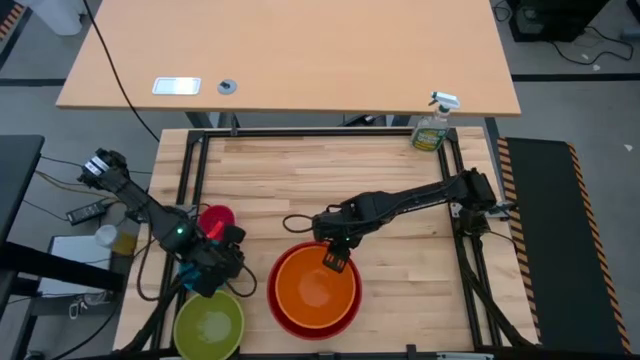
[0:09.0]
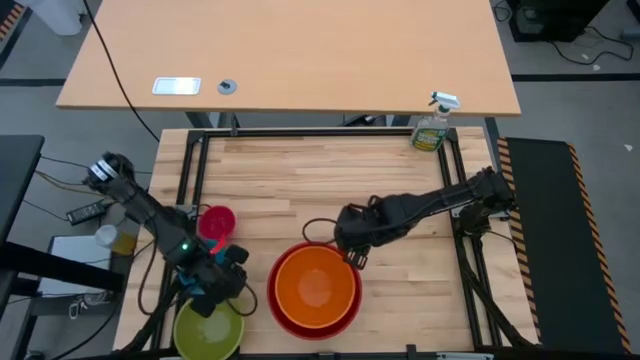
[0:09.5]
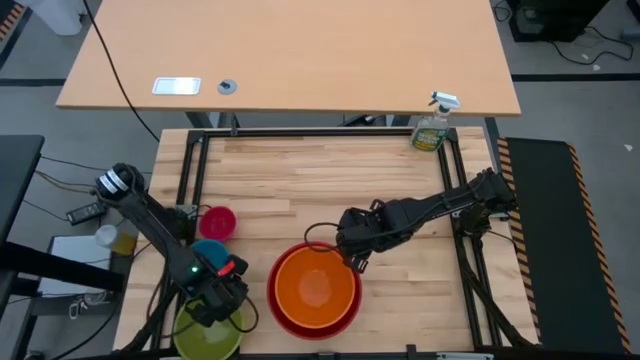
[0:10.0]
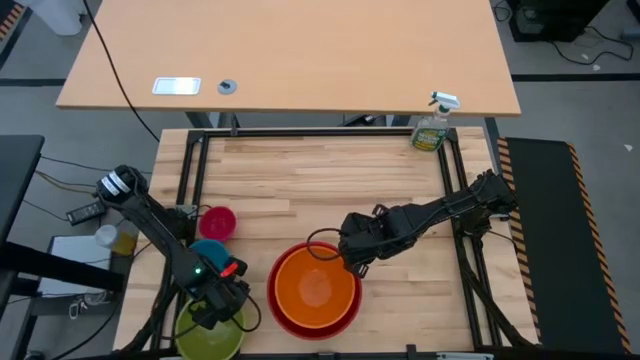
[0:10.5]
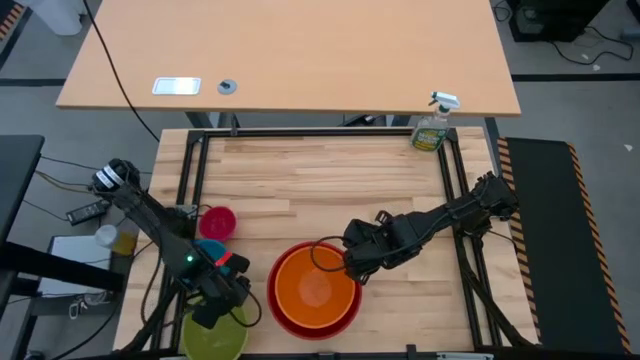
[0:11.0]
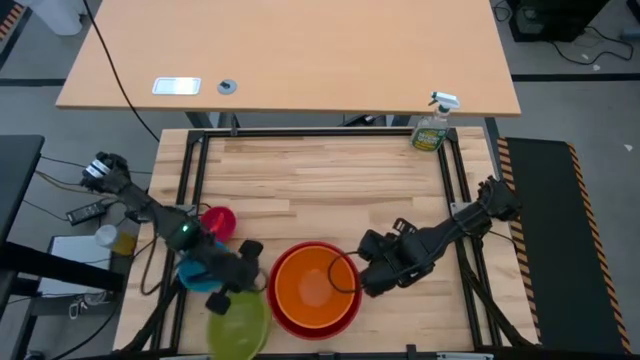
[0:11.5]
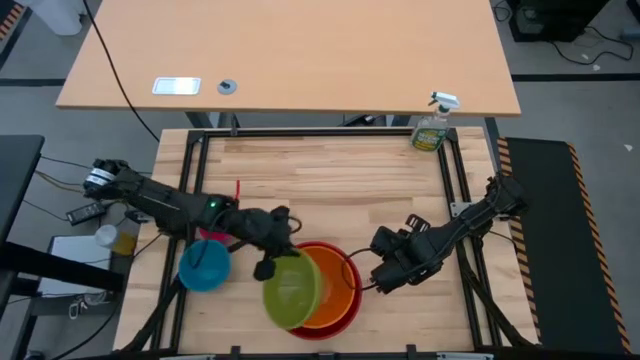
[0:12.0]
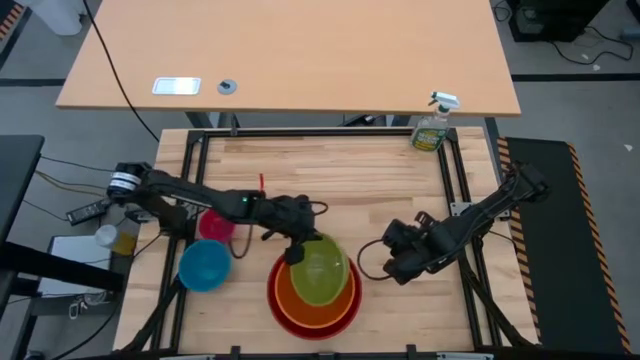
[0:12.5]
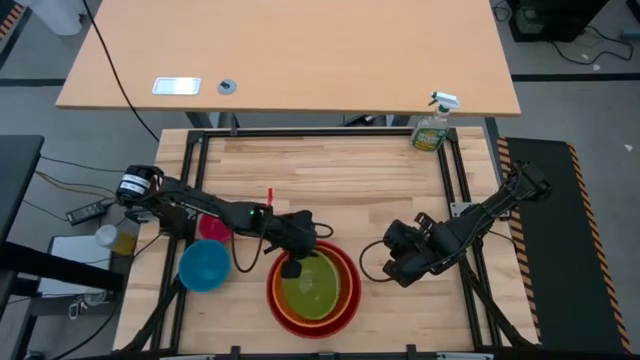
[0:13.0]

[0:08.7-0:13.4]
Stack the green bowl on top of the orange bowl

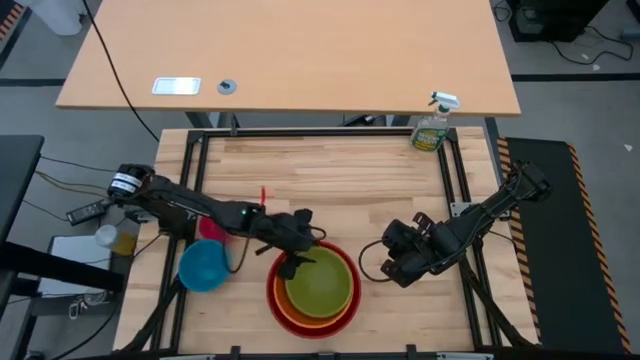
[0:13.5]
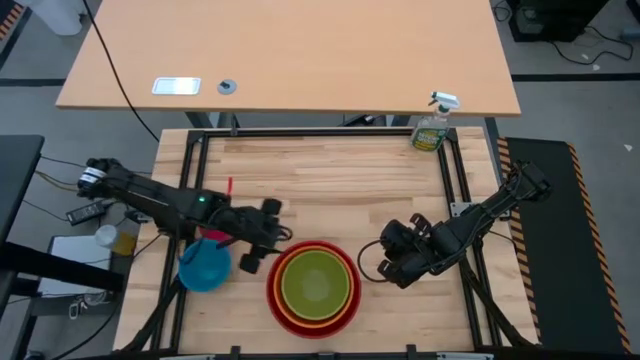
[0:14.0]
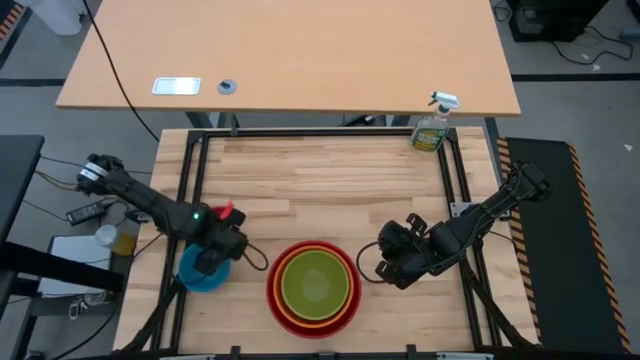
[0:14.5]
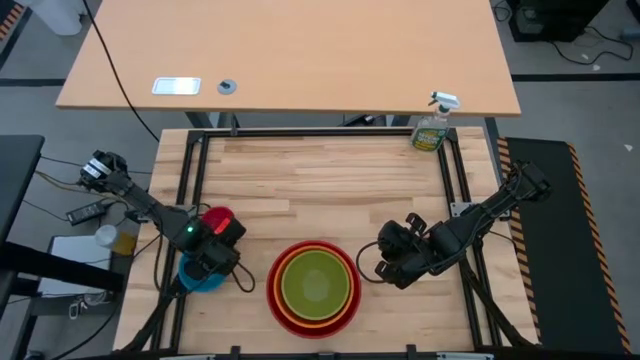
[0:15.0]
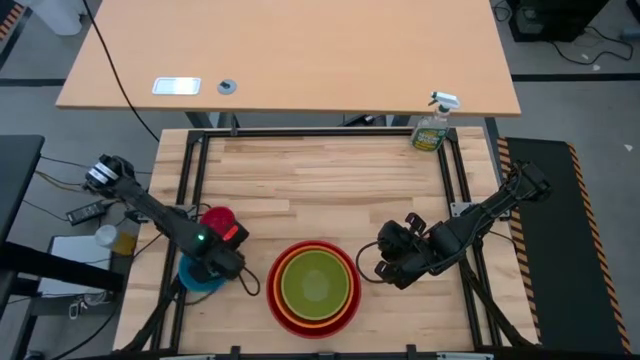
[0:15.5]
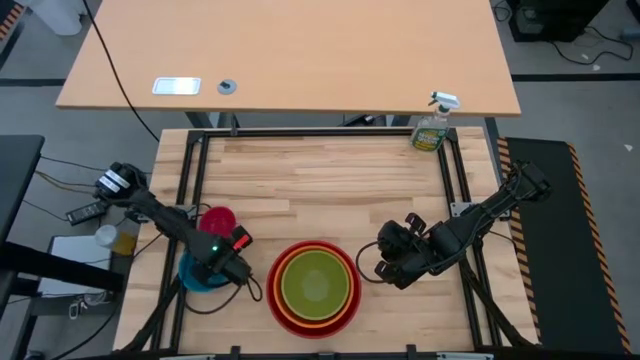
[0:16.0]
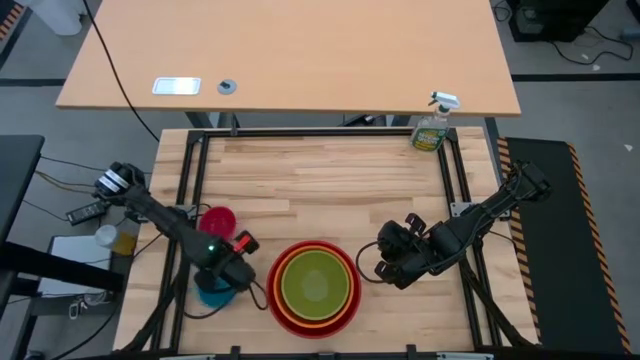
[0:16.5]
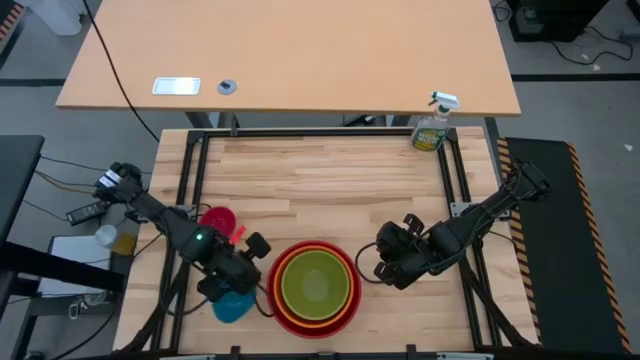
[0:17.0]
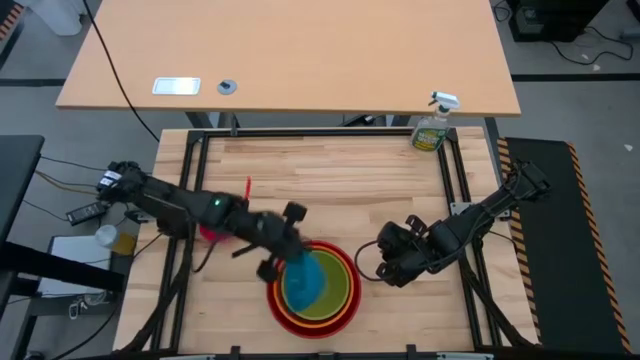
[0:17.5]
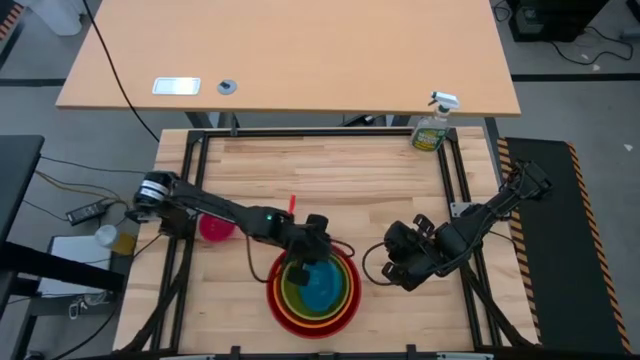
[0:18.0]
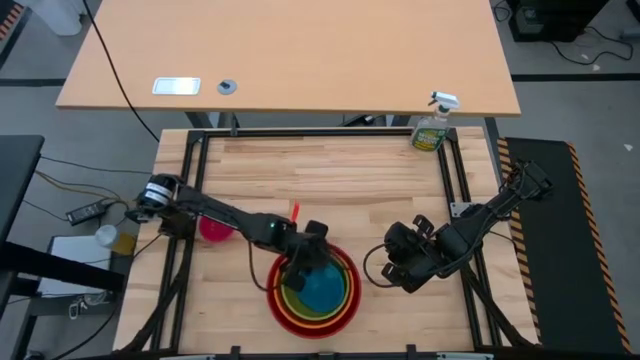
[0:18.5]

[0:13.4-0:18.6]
Stack the blue bowl on top the green bowl

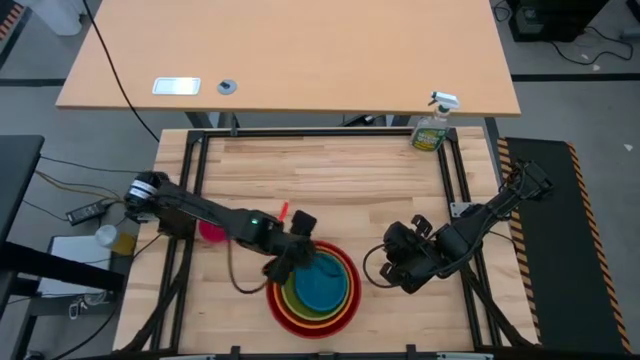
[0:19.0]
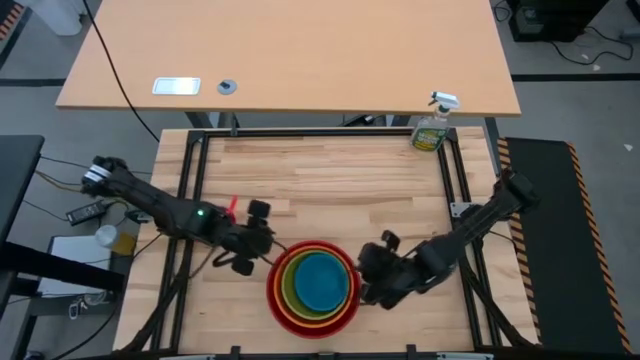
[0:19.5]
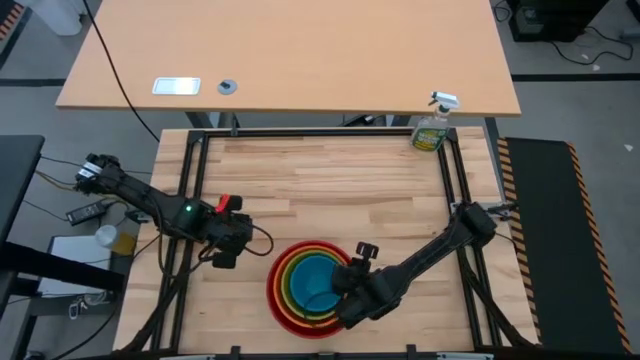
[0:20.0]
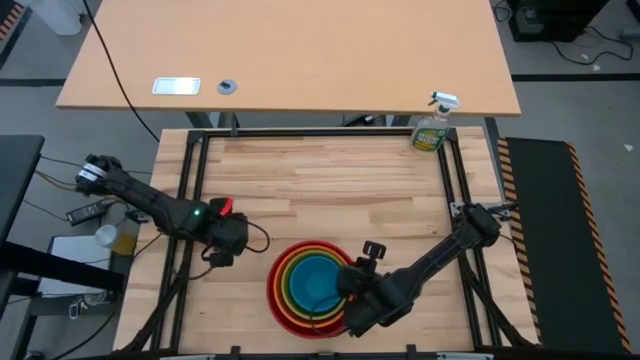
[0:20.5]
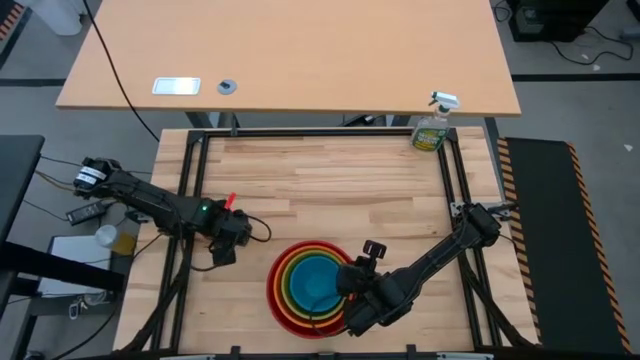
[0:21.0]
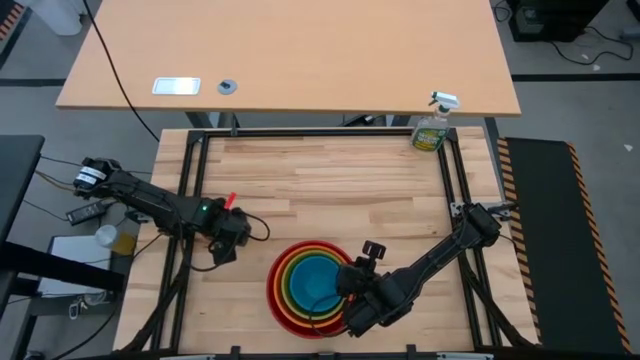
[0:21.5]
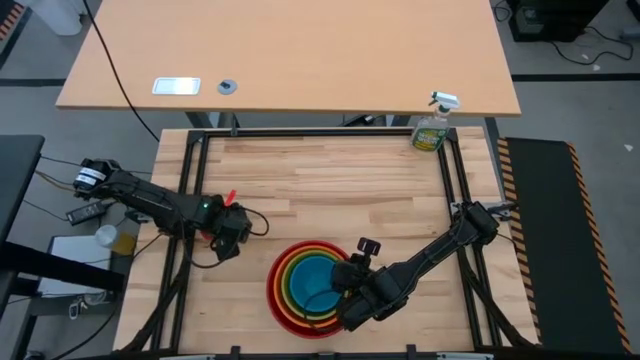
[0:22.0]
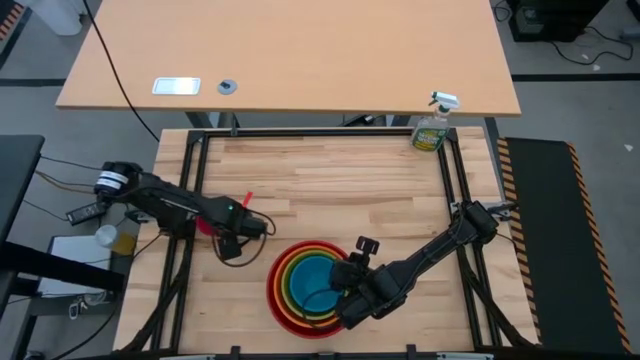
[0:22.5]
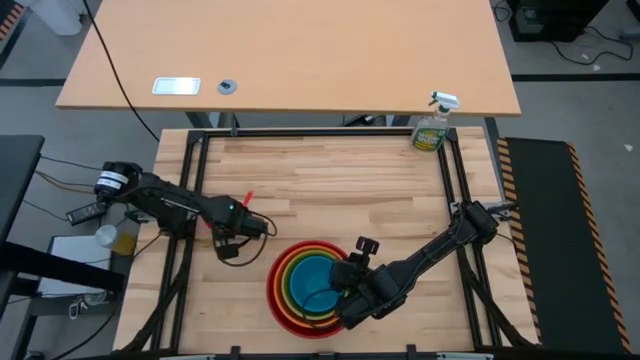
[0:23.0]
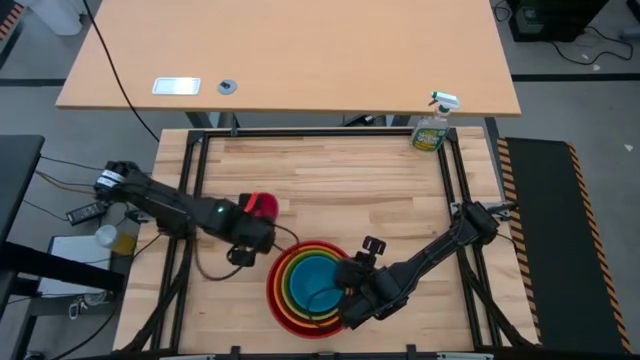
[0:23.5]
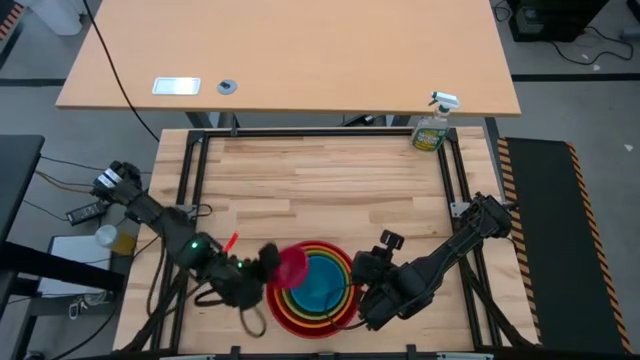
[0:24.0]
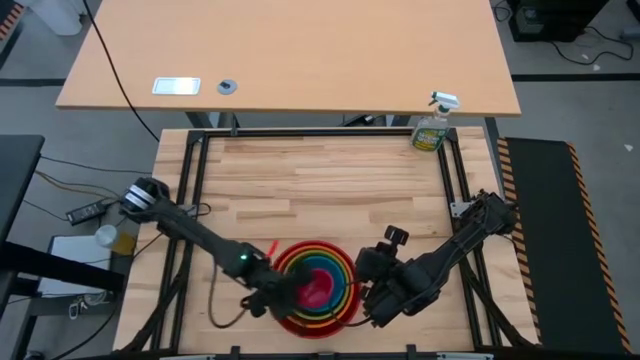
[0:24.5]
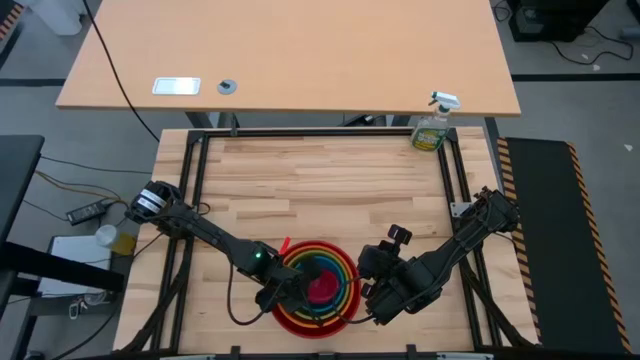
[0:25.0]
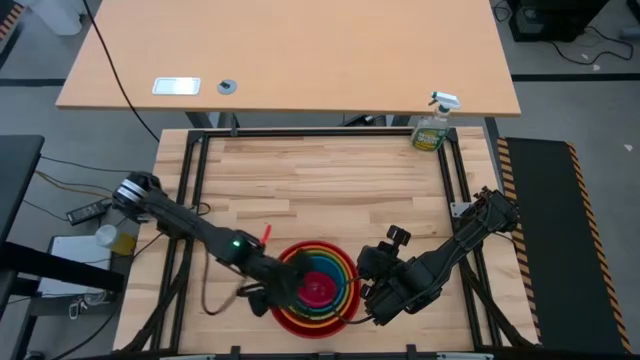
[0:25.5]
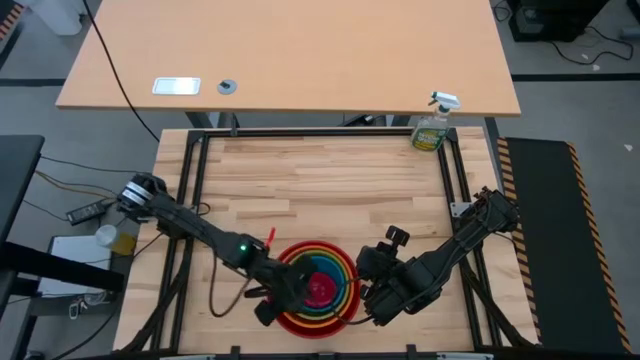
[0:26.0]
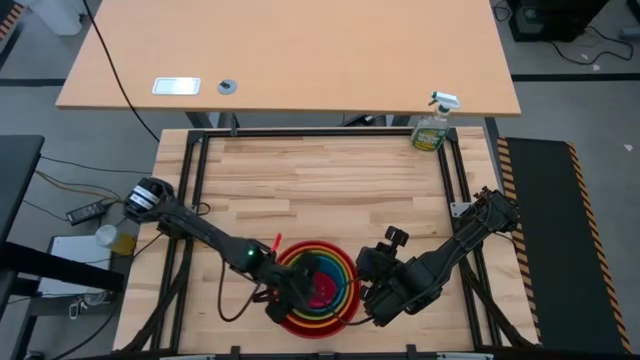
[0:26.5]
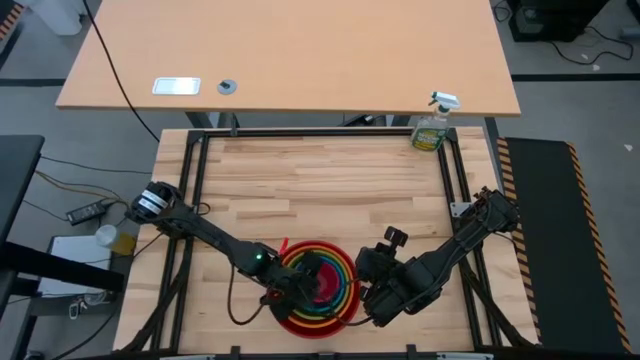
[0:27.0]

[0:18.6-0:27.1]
Stack the pink bowl on top of the blue bowl

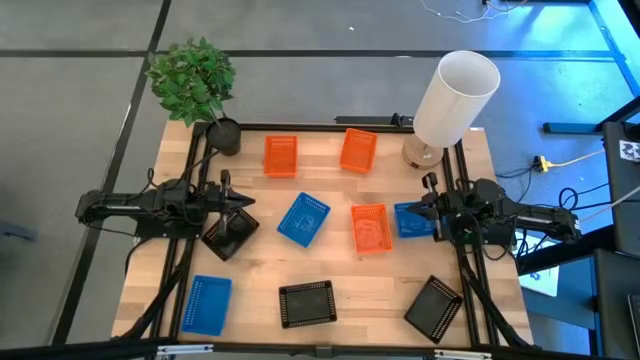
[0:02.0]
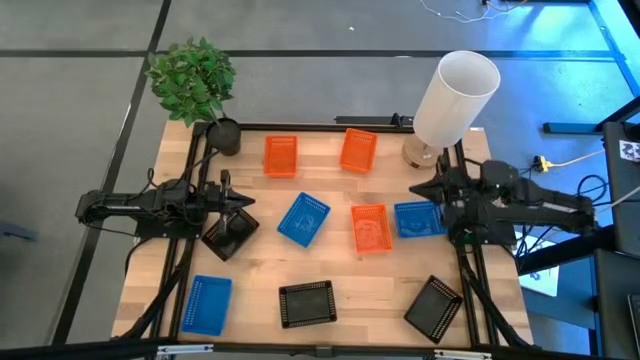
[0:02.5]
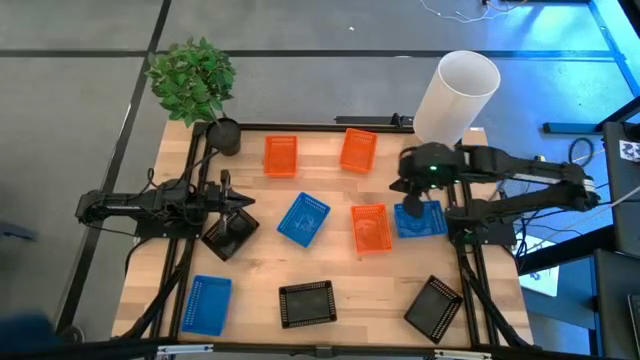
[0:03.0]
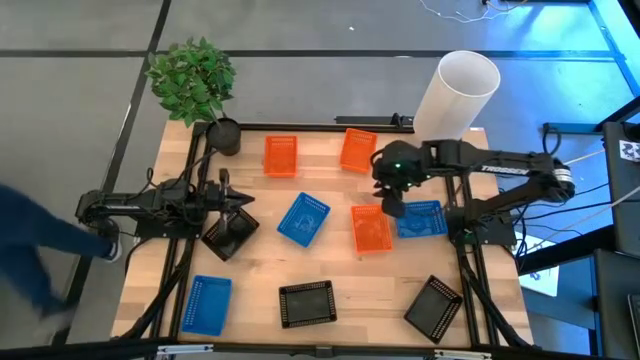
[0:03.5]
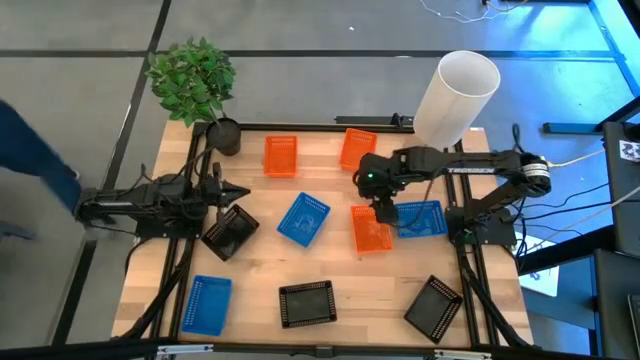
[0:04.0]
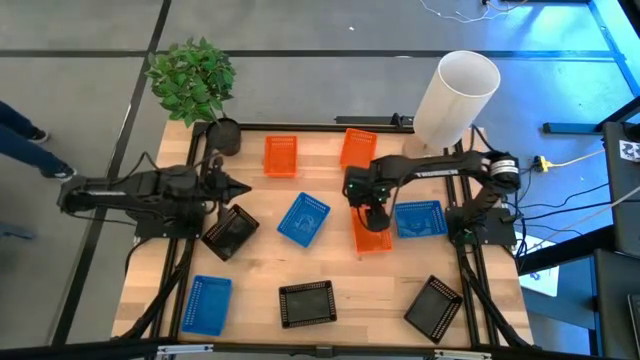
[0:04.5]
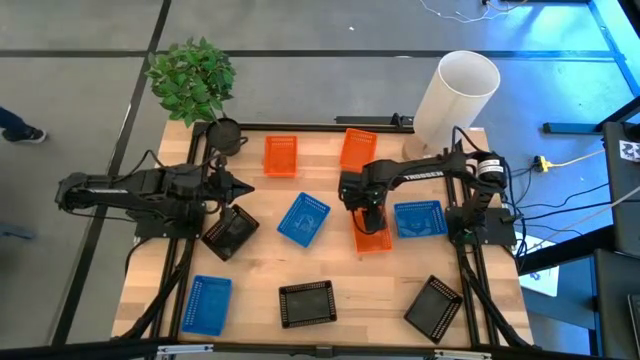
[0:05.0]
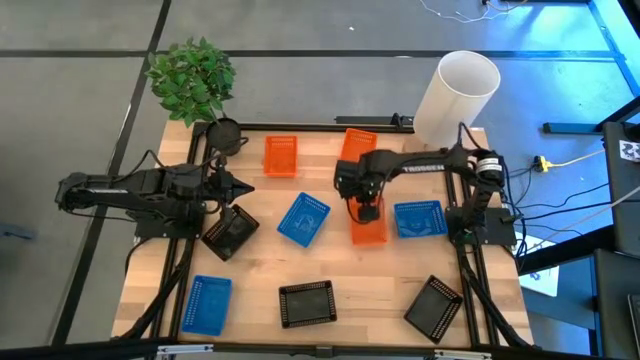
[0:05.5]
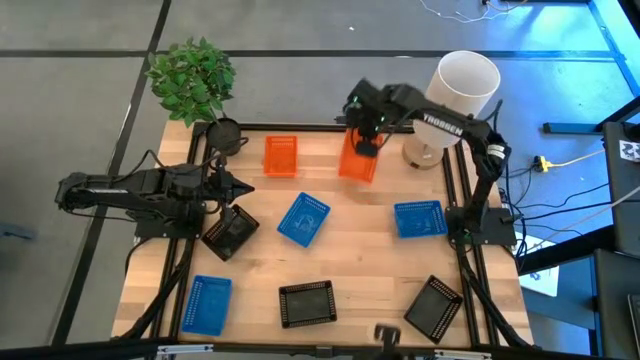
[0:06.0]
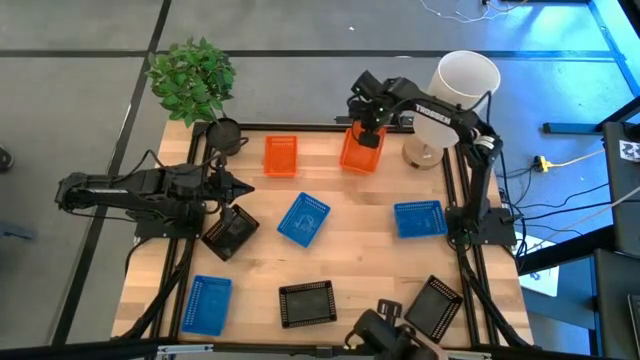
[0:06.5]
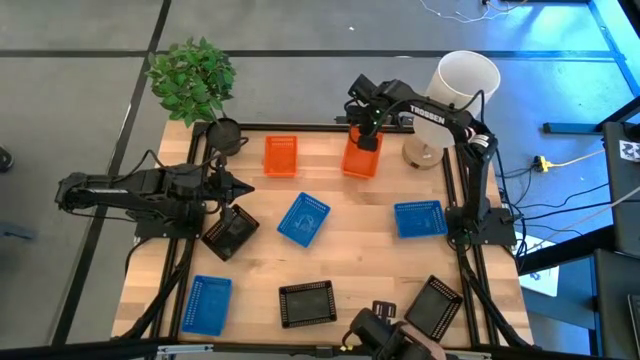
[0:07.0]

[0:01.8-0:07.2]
Stack the bottom right orange bin on the right orange bin
